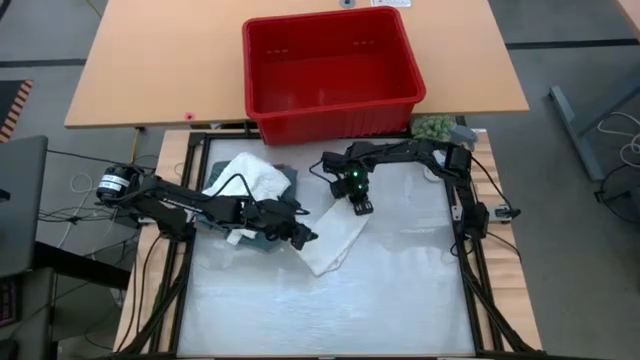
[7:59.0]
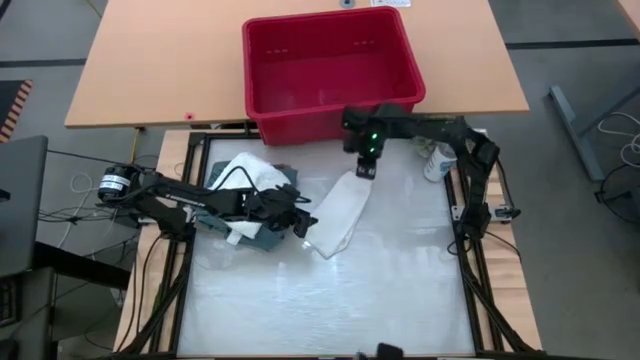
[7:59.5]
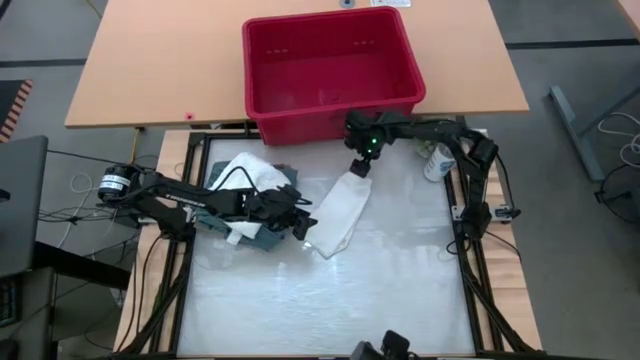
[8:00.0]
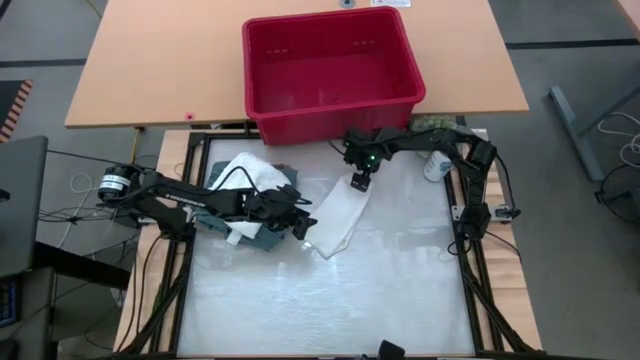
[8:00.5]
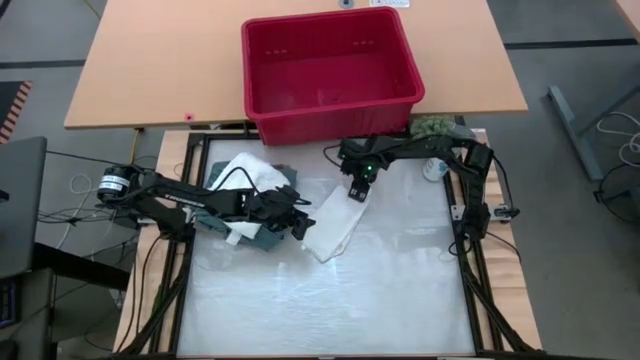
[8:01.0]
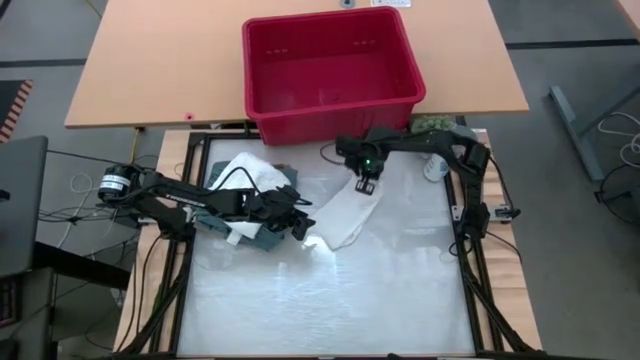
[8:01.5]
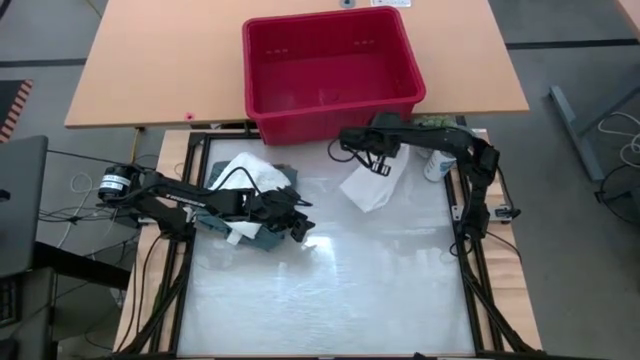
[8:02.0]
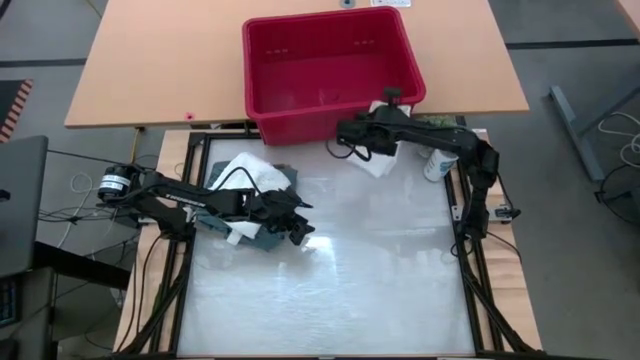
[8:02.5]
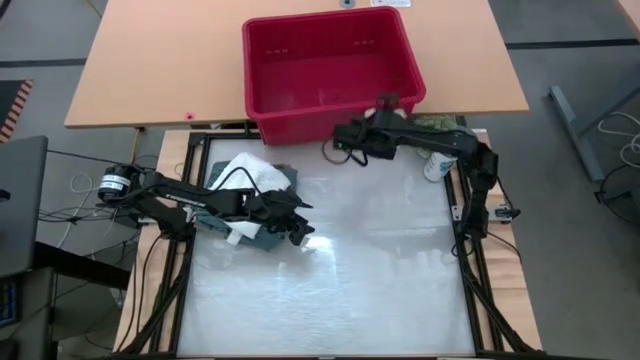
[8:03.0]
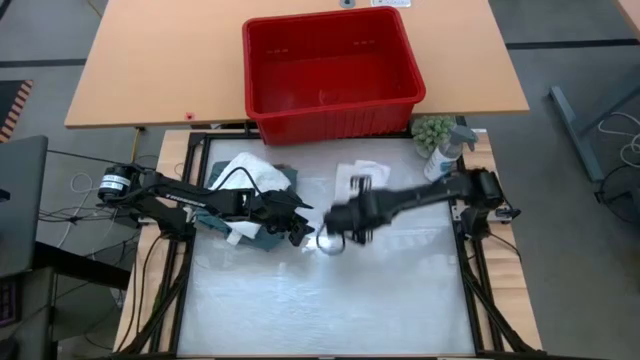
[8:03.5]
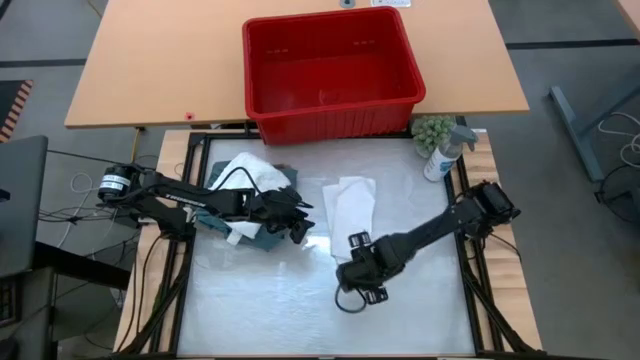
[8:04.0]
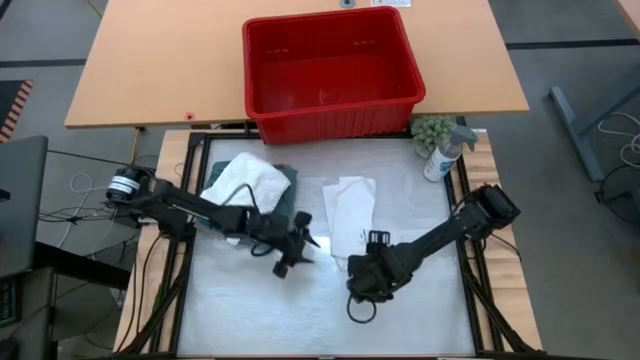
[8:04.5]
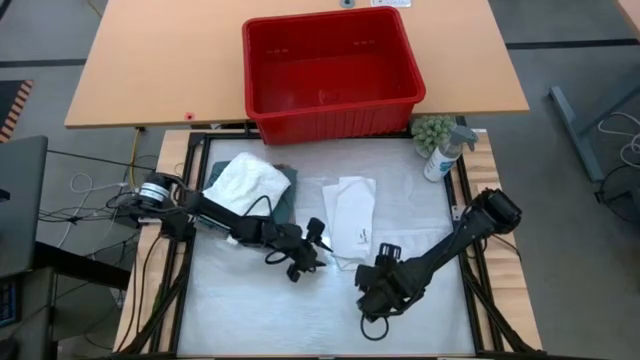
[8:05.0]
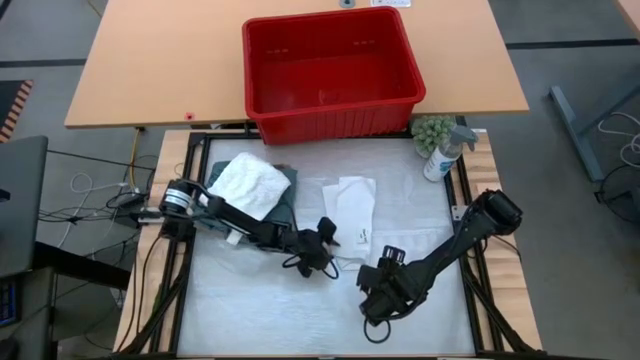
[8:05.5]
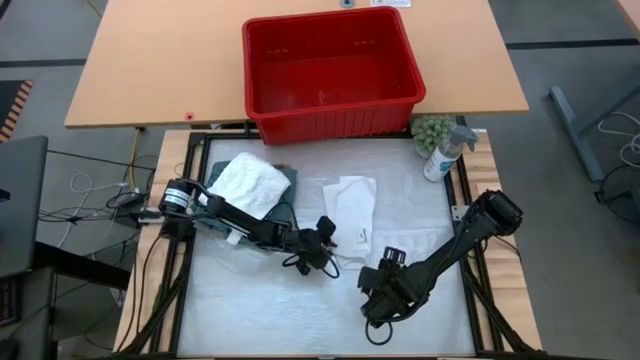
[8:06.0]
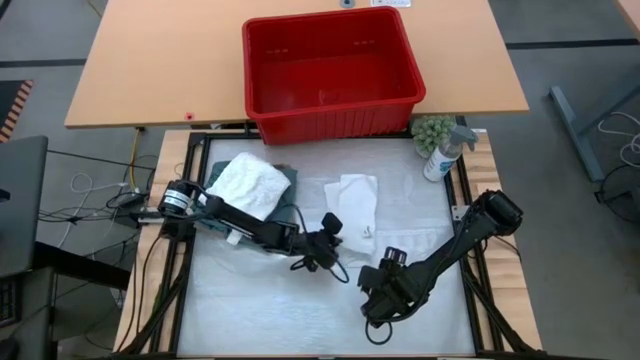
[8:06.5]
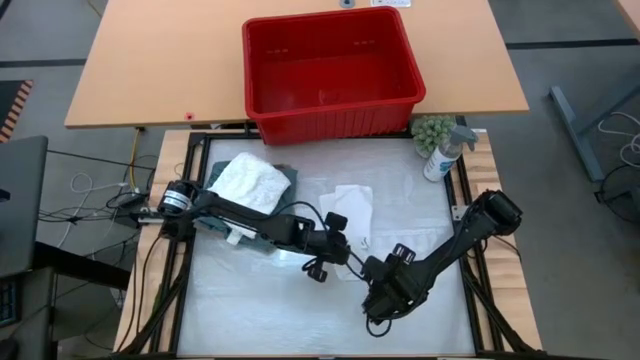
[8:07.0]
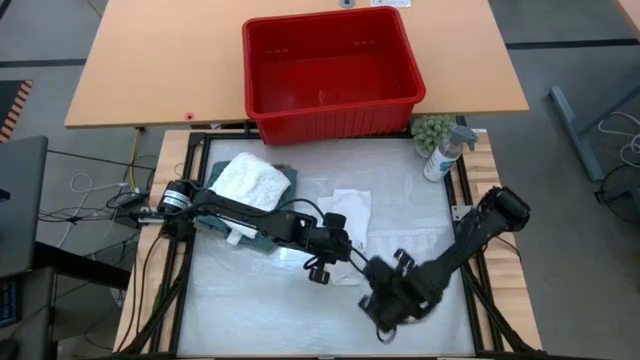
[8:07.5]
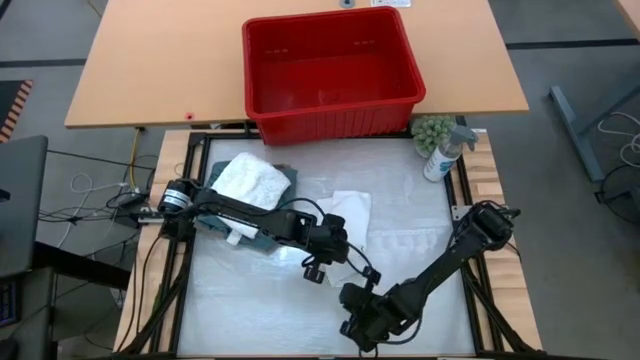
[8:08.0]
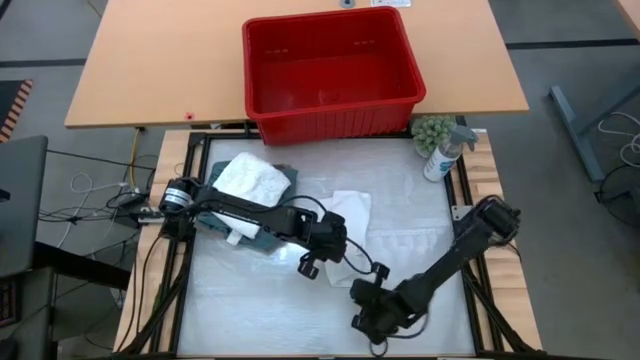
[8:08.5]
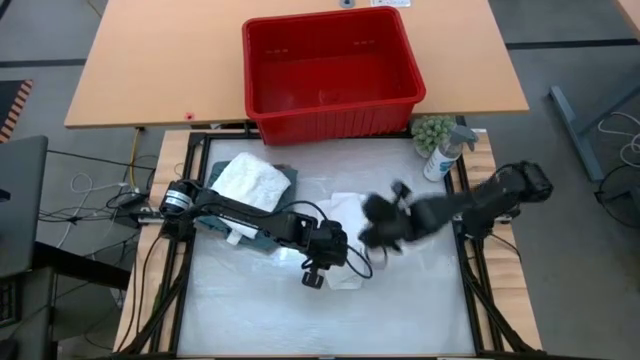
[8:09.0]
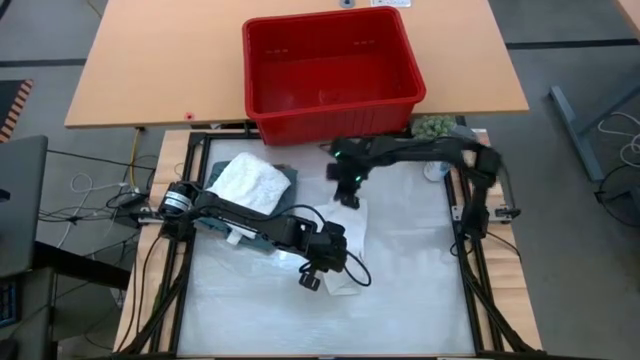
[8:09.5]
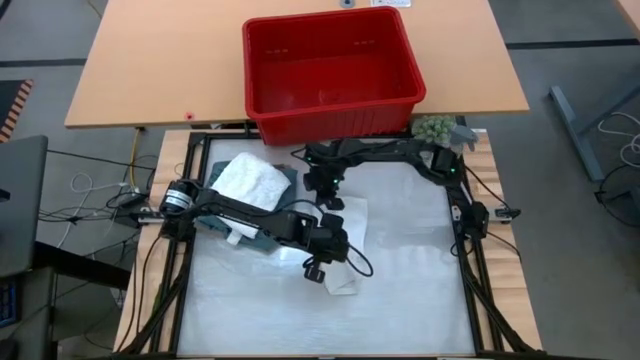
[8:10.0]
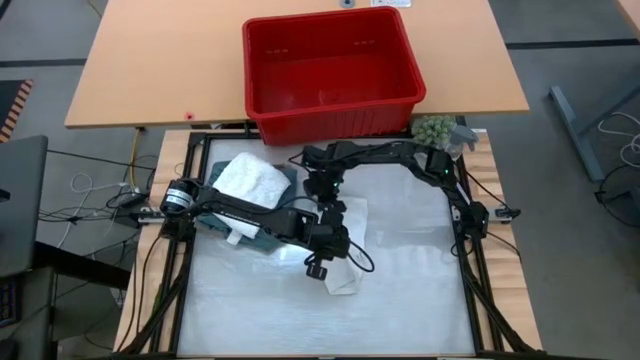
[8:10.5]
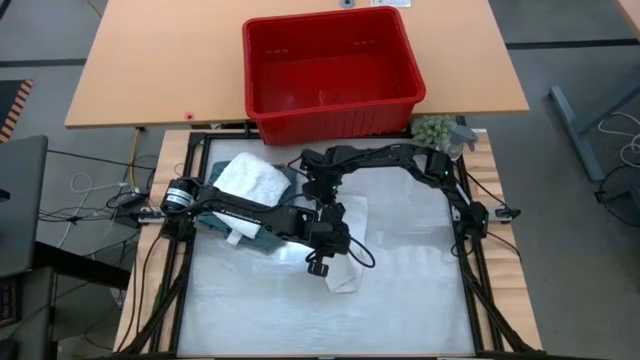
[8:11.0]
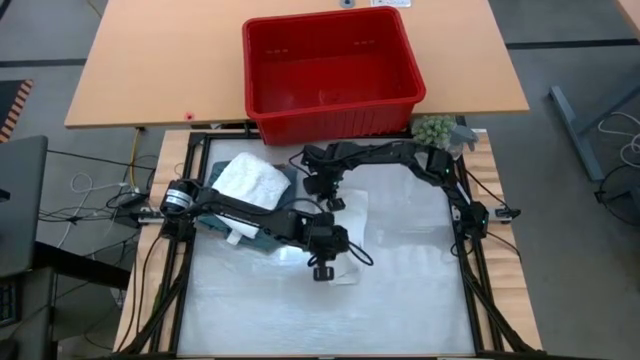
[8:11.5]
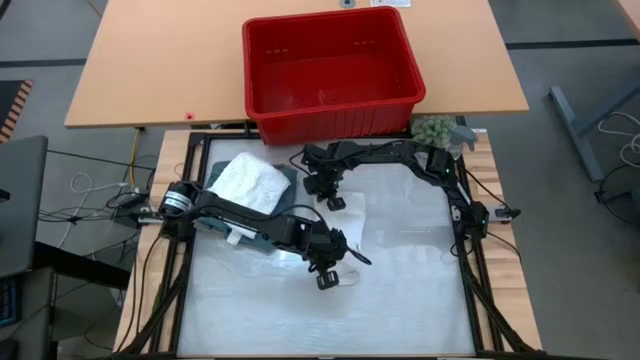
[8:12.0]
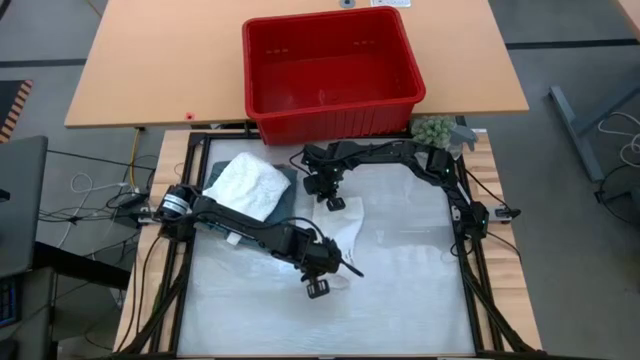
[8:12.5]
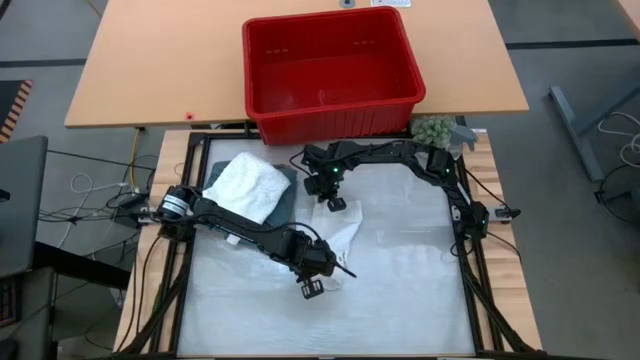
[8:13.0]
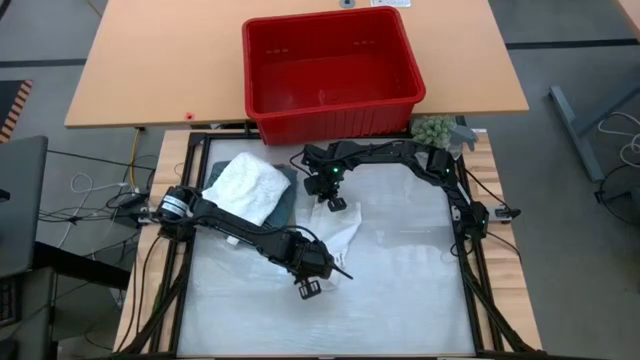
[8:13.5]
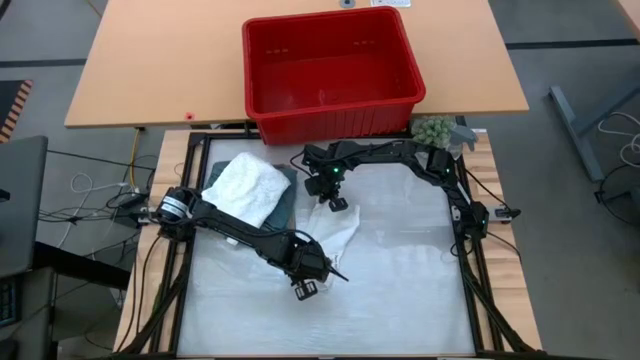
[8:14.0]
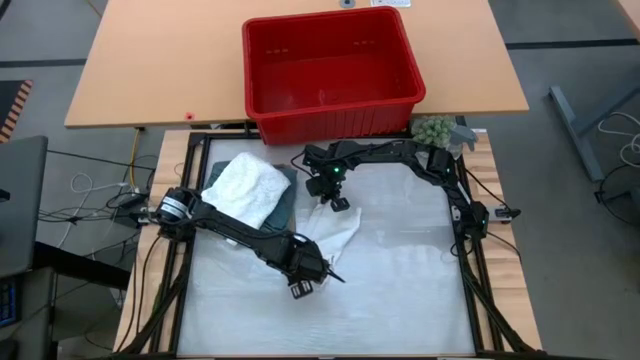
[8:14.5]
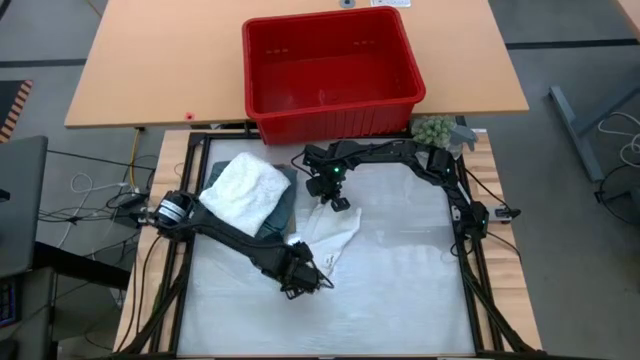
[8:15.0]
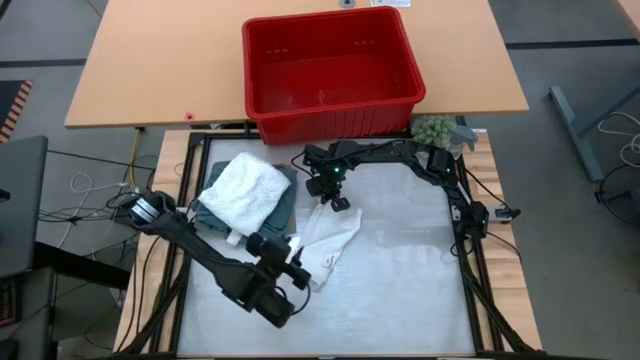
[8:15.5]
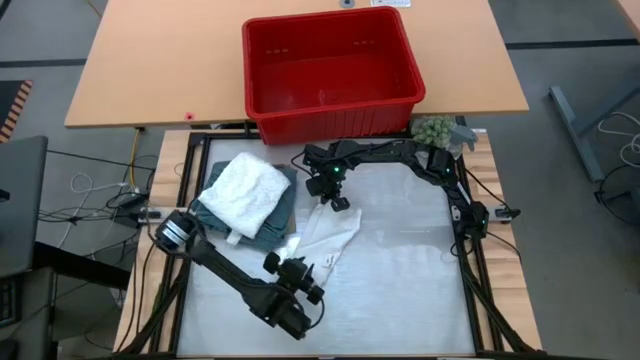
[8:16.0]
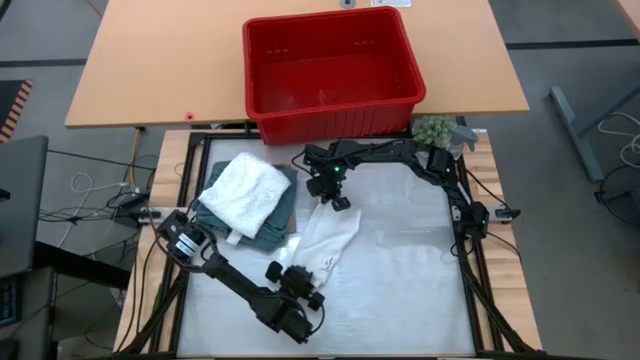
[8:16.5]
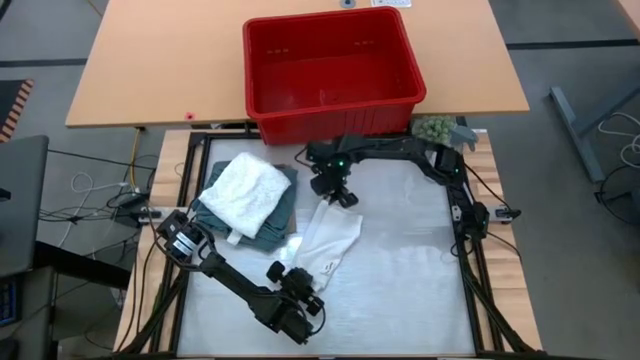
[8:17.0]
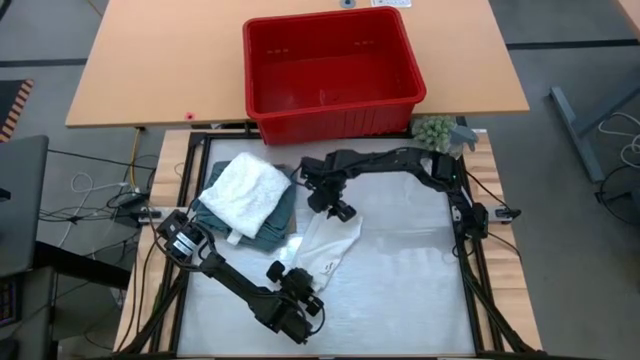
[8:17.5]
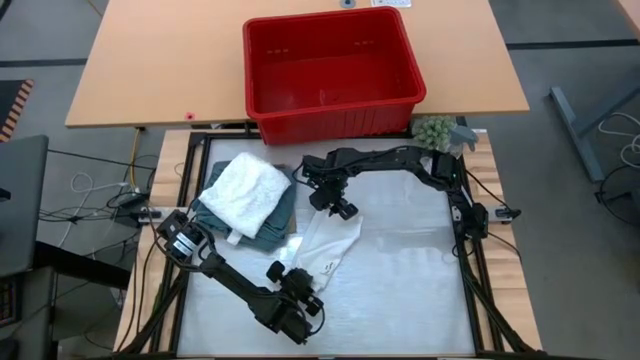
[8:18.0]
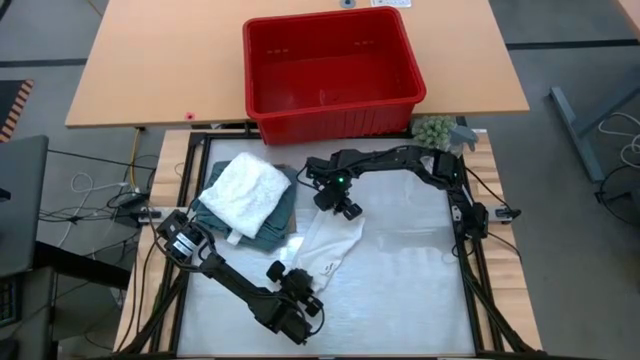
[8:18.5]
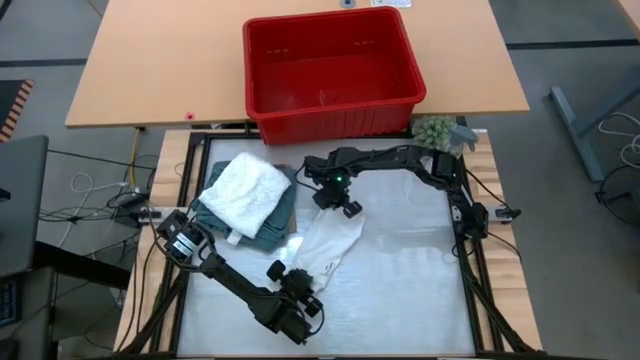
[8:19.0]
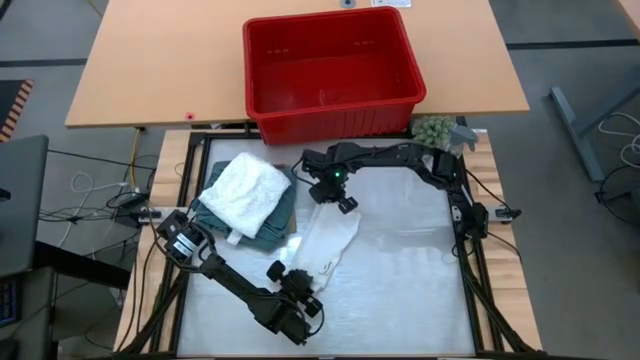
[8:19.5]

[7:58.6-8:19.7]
Task: Fold Laundry from Bin
Fold the white underwear in the red bin
